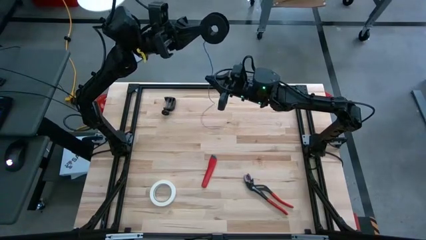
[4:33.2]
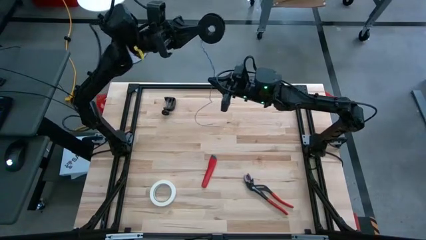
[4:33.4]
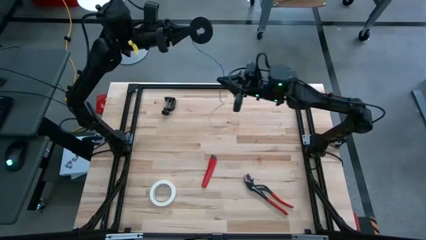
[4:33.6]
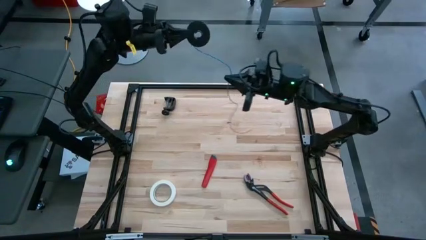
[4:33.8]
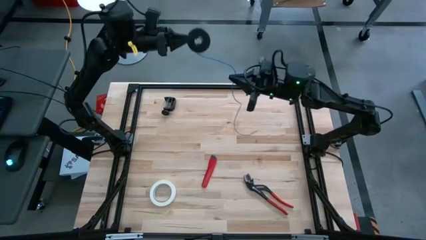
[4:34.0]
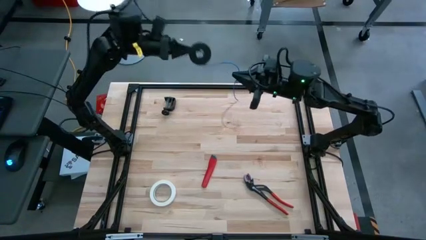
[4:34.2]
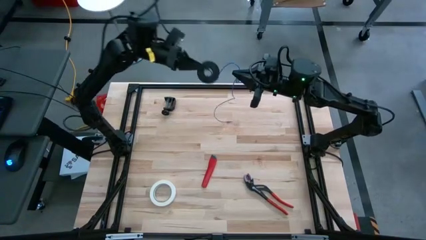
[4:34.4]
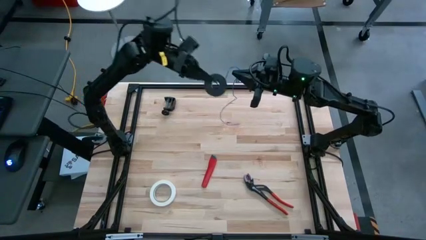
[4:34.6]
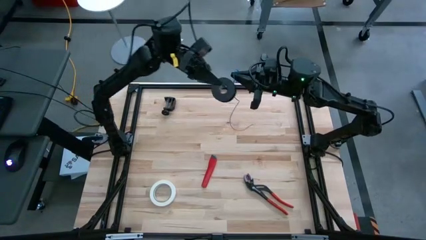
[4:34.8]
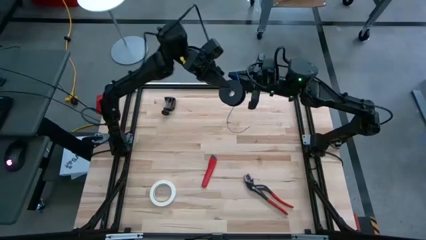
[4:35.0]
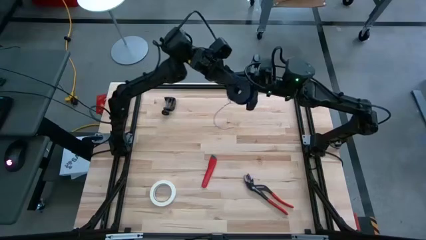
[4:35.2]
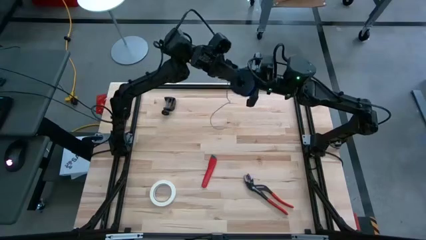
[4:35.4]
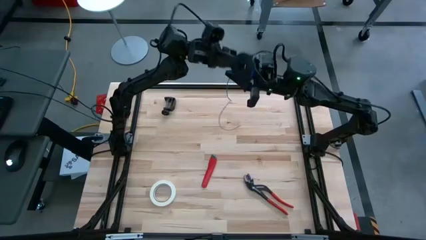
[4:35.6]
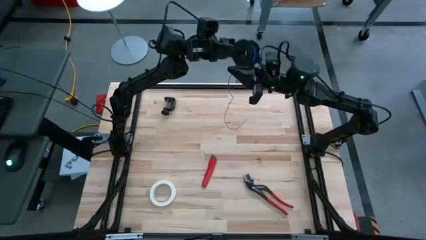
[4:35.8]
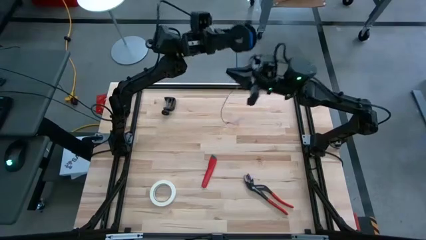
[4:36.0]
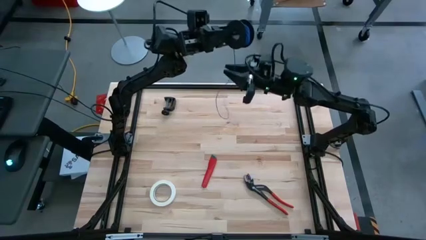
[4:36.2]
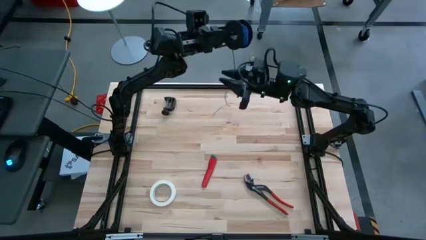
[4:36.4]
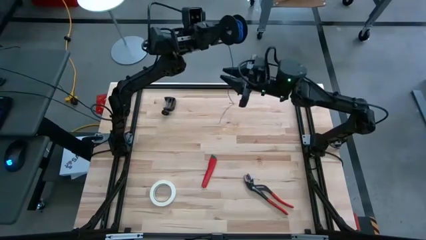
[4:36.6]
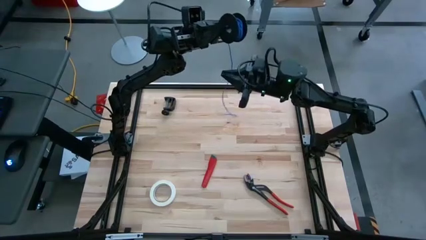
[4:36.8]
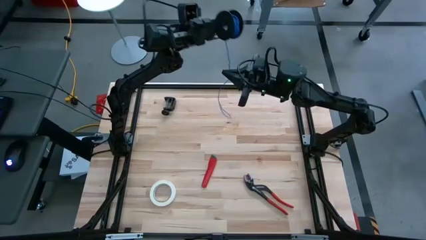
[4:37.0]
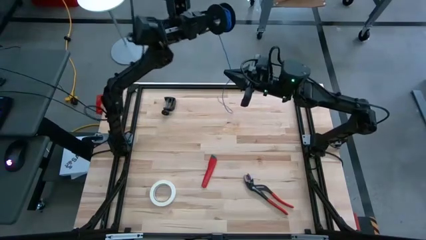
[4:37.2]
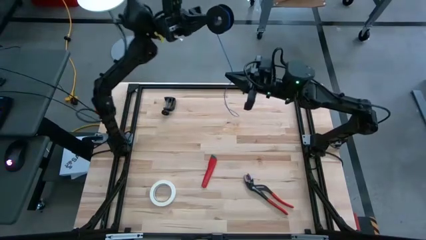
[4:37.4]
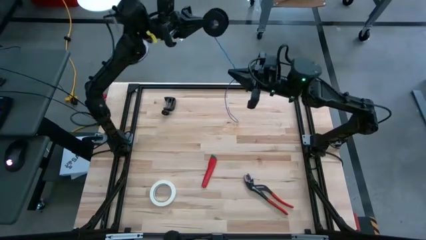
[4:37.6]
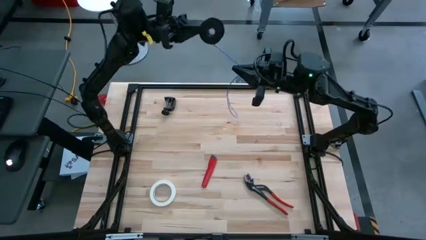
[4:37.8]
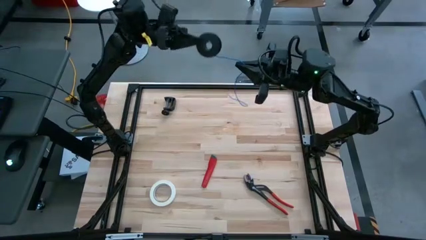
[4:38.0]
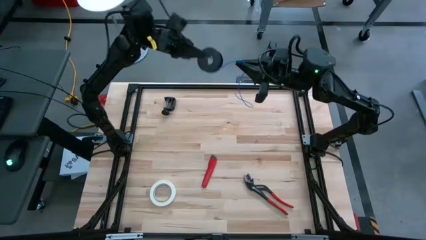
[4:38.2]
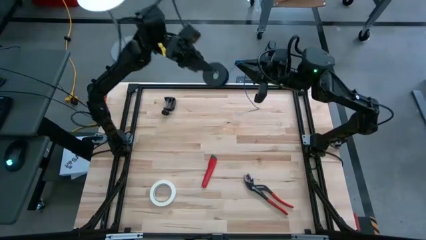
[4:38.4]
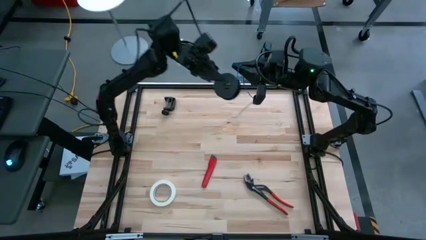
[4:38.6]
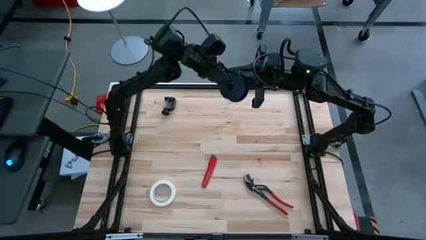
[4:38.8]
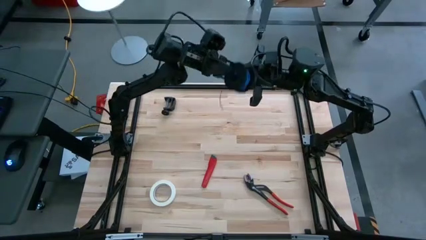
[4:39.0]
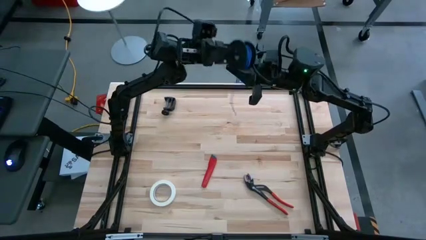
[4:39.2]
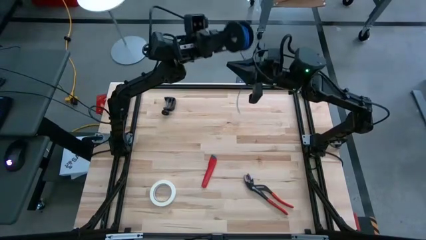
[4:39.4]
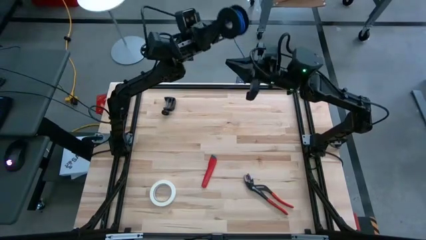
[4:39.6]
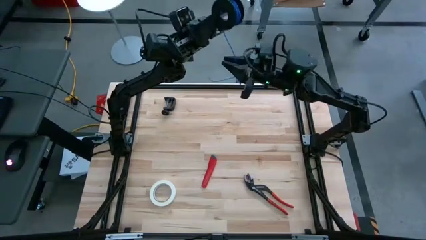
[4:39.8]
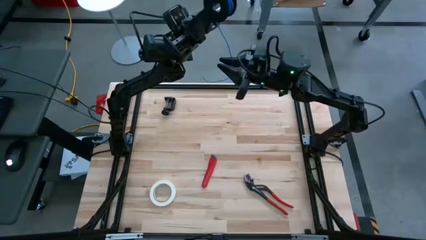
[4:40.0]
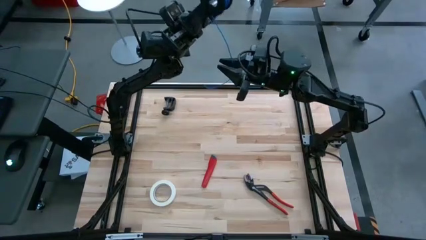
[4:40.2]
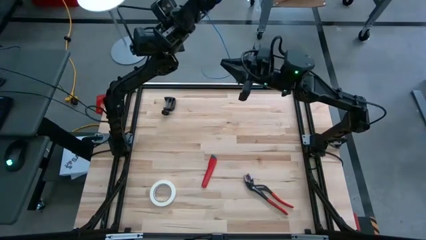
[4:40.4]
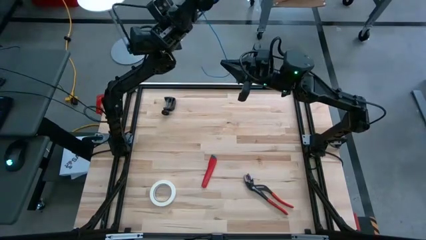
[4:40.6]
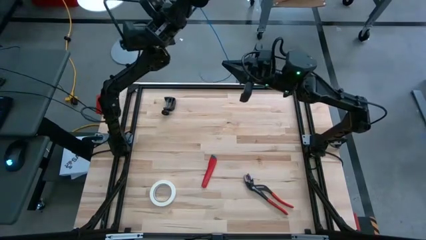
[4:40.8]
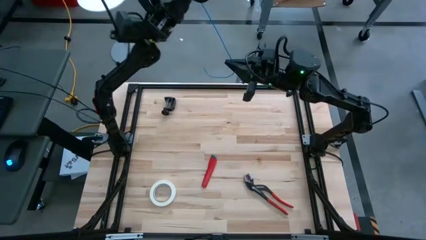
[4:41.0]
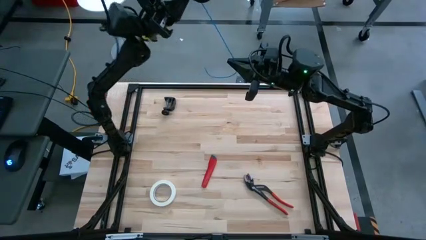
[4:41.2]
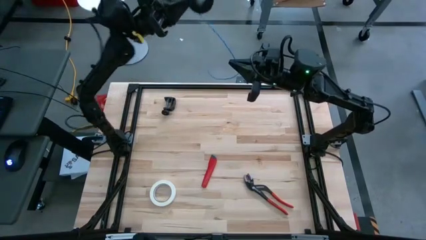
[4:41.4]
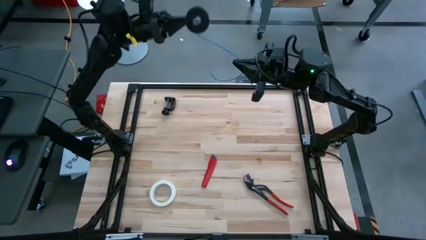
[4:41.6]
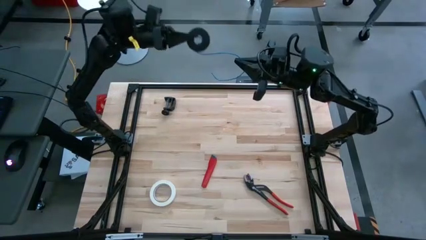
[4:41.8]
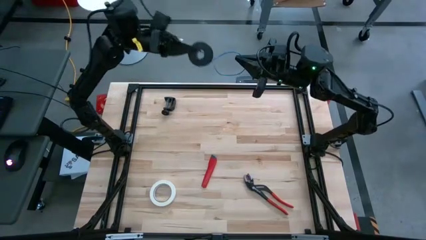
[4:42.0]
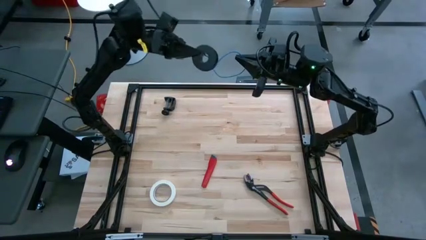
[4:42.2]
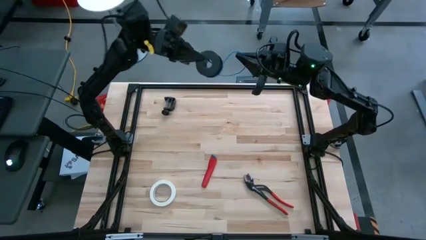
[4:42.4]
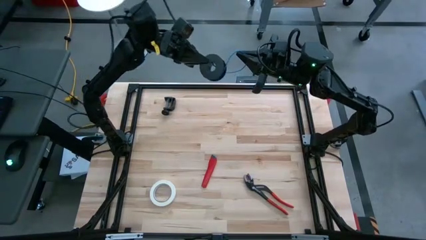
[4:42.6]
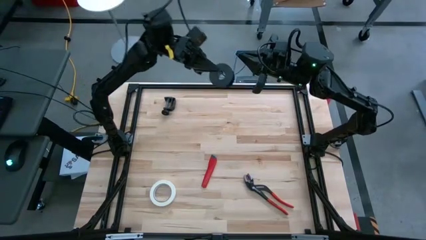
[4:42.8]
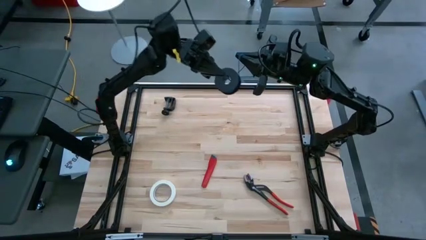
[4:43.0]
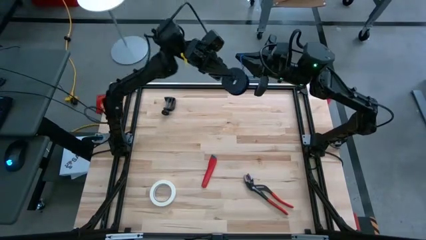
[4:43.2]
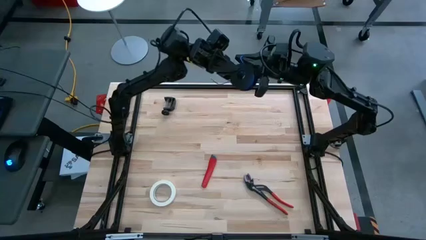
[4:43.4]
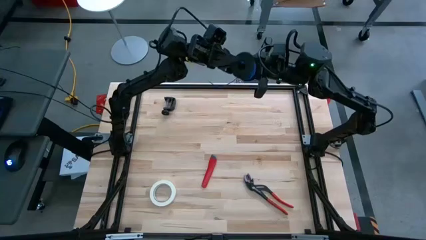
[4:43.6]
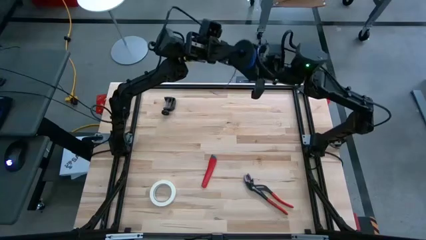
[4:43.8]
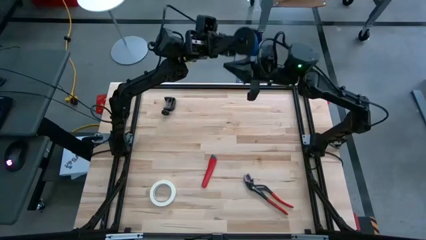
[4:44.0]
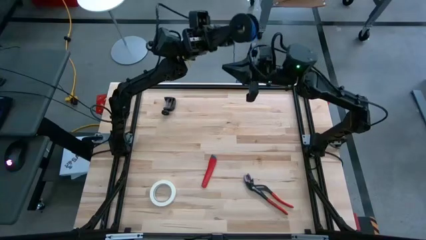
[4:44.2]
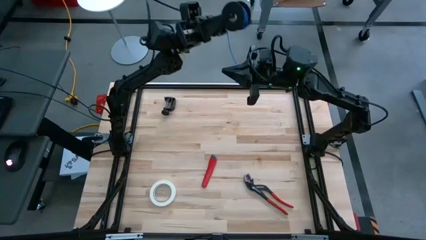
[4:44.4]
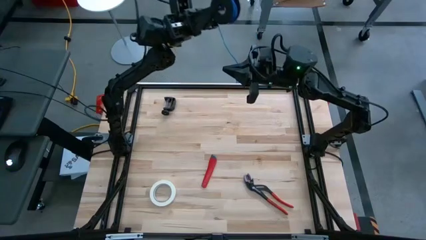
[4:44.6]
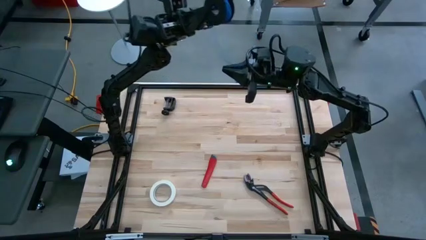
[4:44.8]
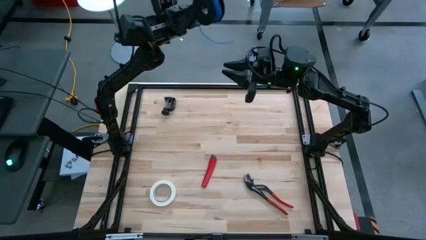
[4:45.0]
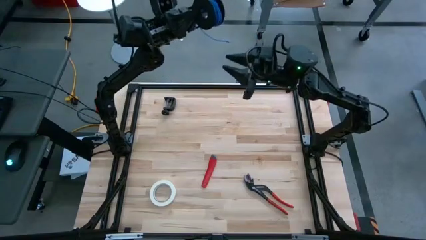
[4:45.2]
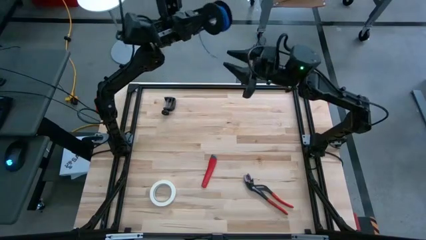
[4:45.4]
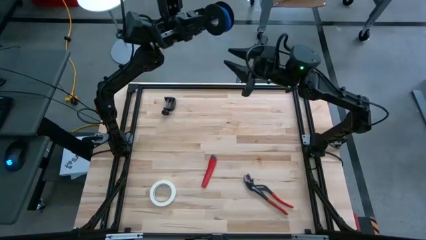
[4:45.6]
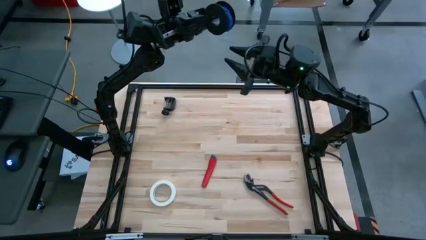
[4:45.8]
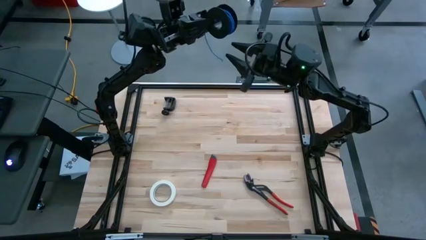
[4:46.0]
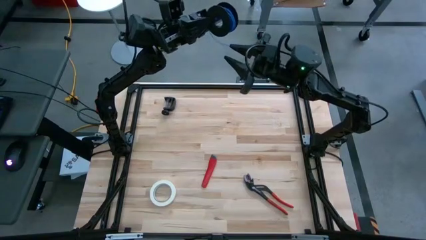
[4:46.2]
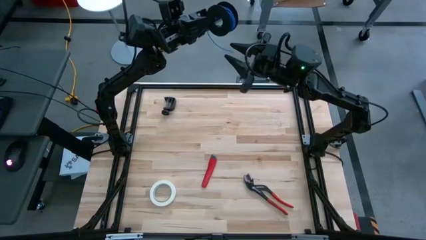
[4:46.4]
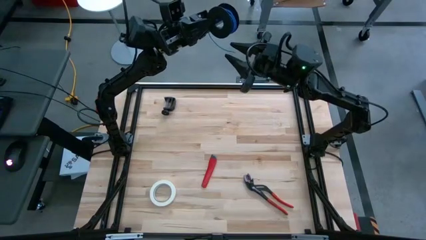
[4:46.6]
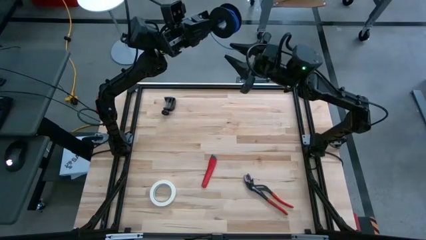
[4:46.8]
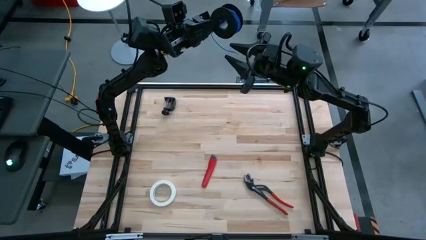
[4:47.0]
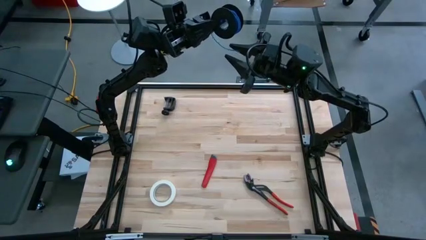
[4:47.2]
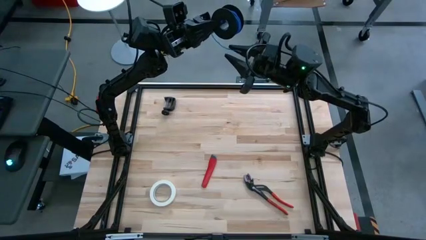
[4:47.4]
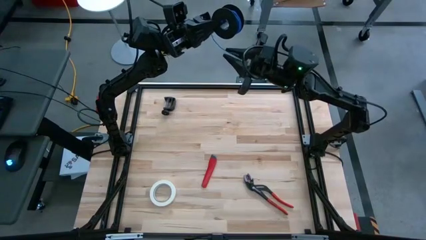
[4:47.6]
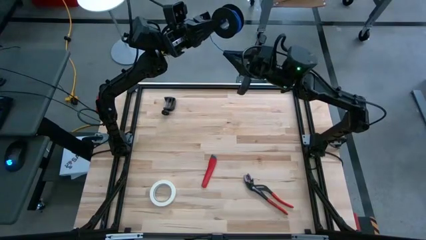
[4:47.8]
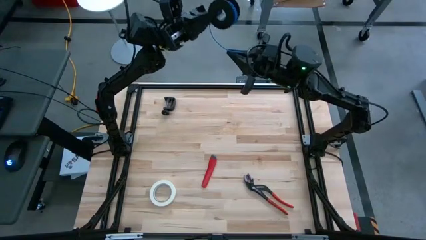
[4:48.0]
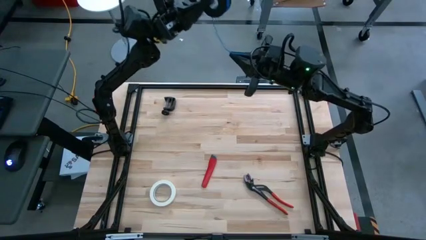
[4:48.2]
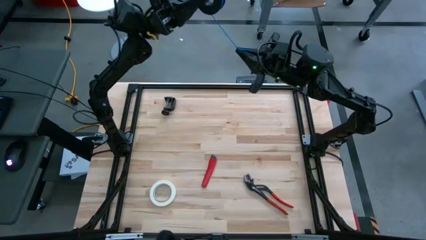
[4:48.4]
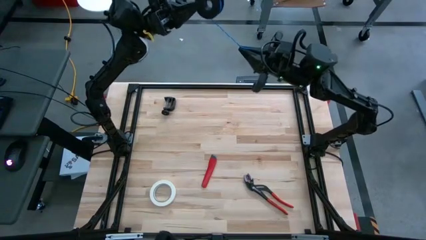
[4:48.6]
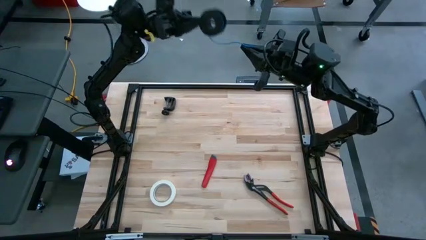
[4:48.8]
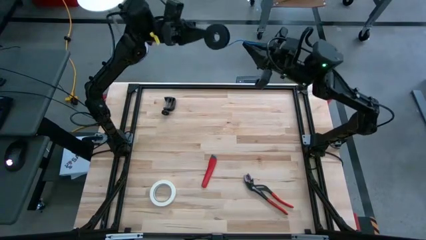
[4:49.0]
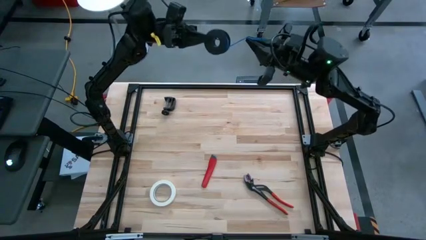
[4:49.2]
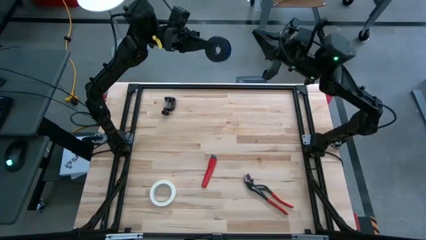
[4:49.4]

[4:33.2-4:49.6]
Task: Coil cords
Coil the blue wire cable onto the black spool
